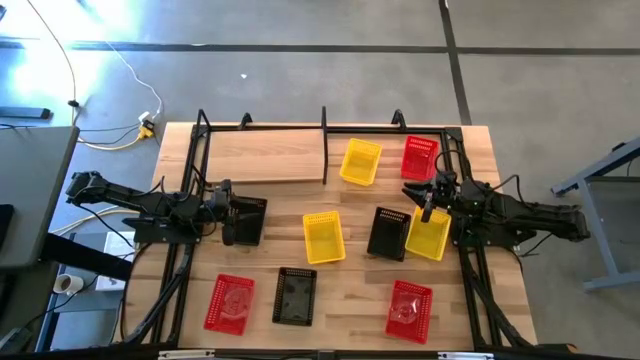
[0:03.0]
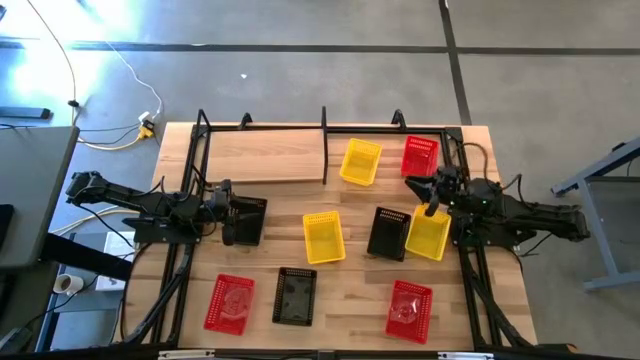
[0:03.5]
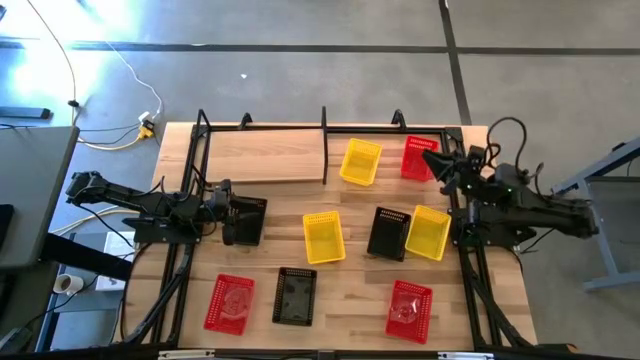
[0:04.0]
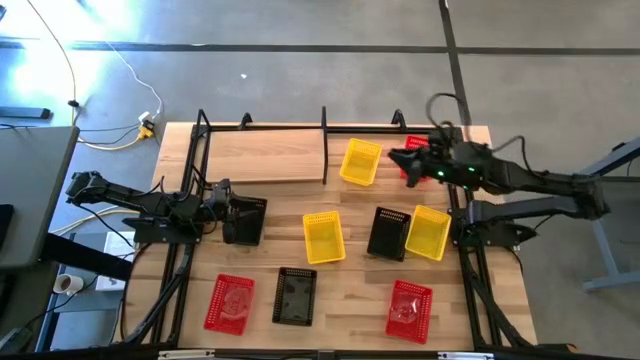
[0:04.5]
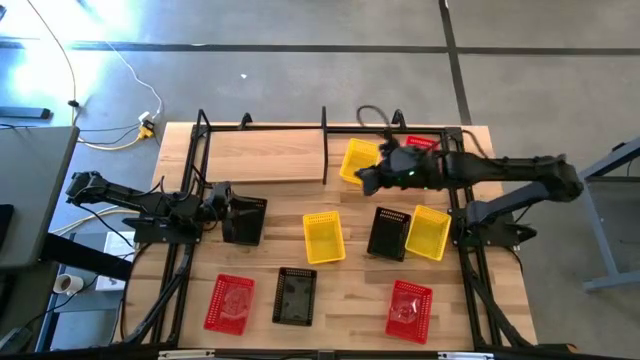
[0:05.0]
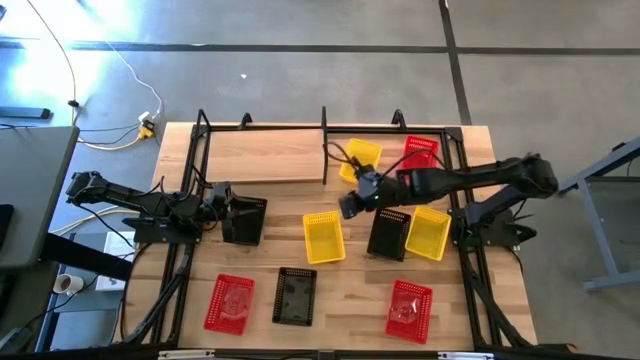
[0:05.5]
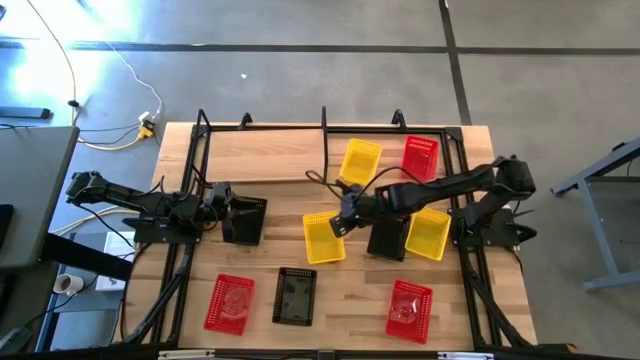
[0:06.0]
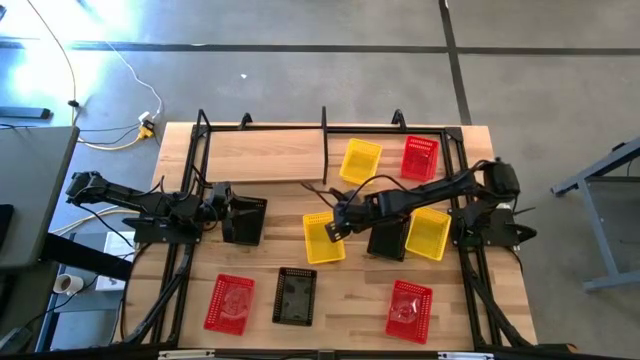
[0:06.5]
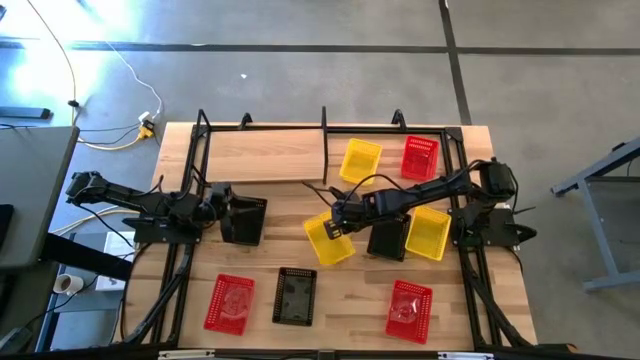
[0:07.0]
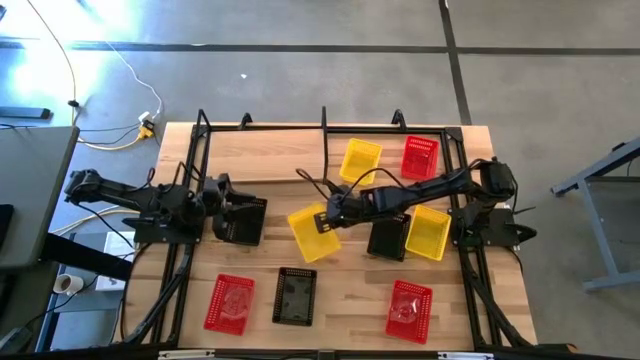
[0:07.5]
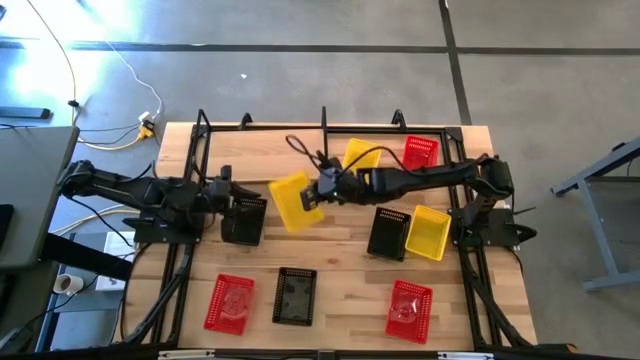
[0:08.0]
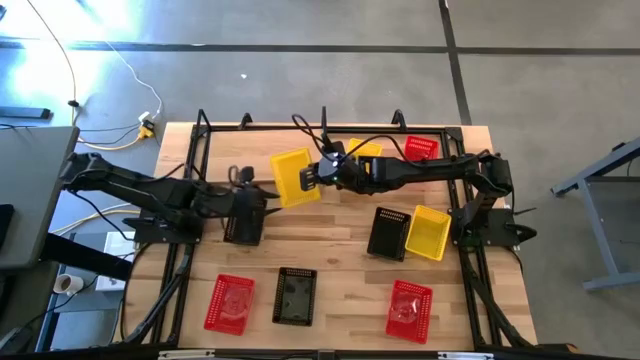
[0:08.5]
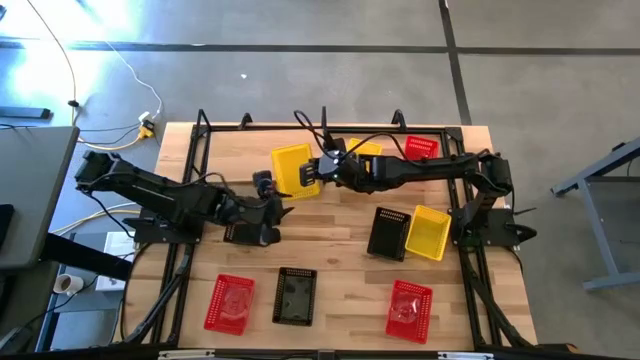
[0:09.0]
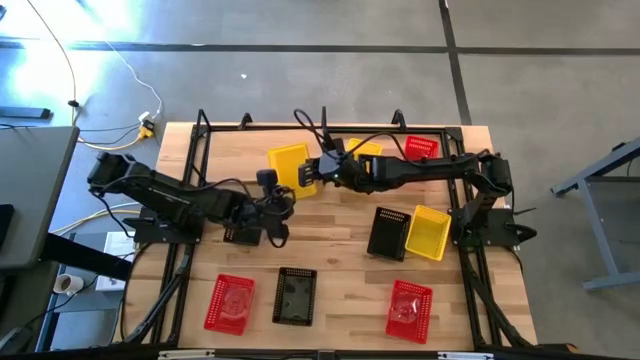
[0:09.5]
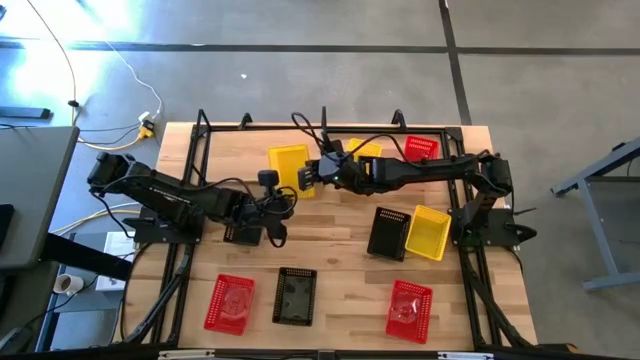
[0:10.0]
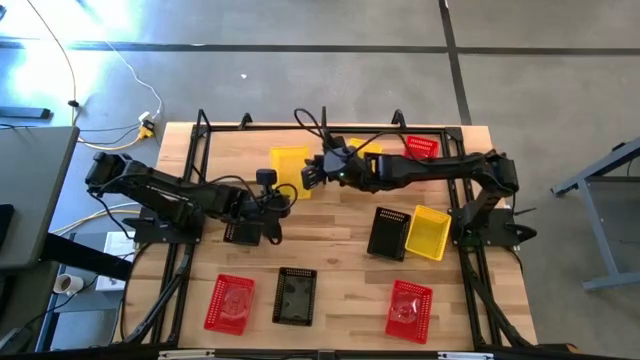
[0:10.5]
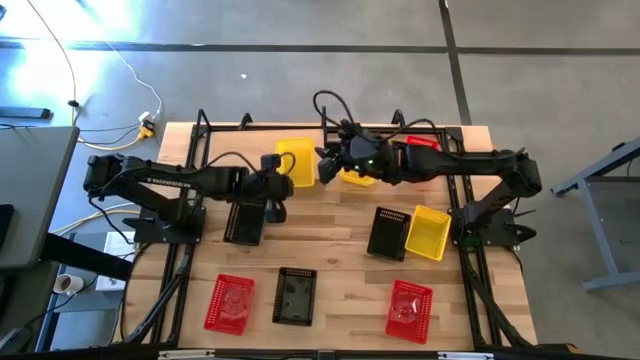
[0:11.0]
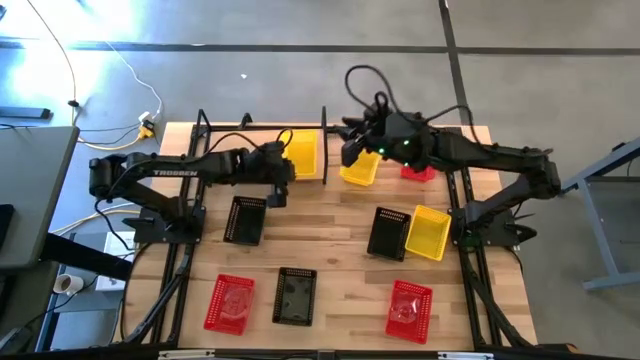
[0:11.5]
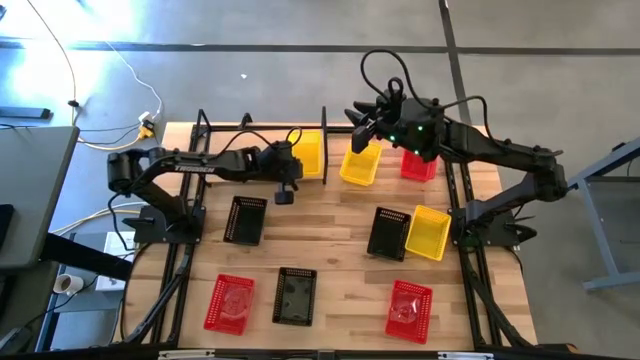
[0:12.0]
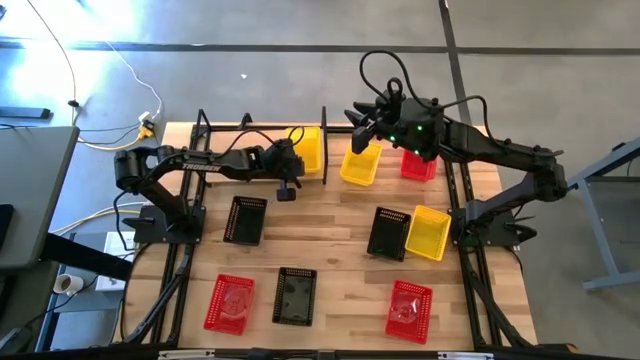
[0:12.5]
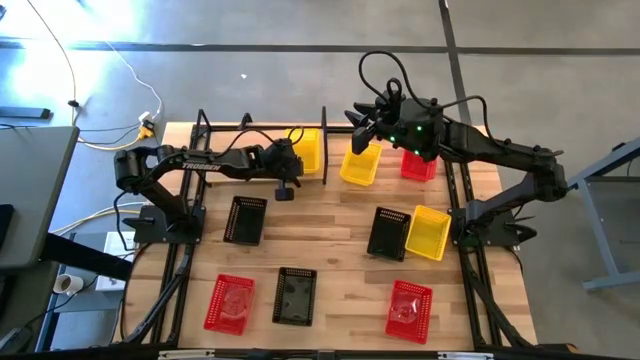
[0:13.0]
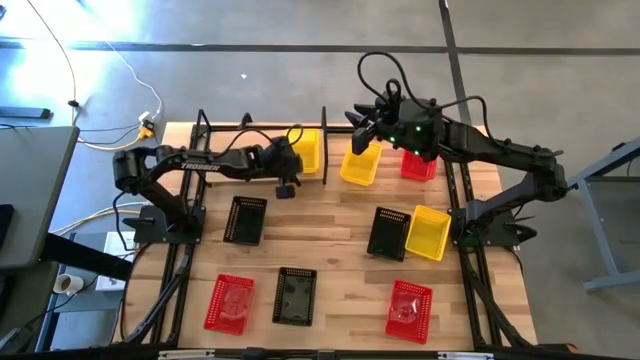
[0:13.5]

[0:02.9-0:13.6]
Task: Stack baskets on shelf by color
Put the bottom left yellow bin on the shelf

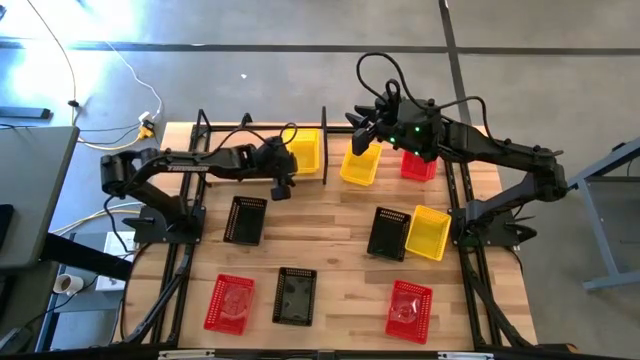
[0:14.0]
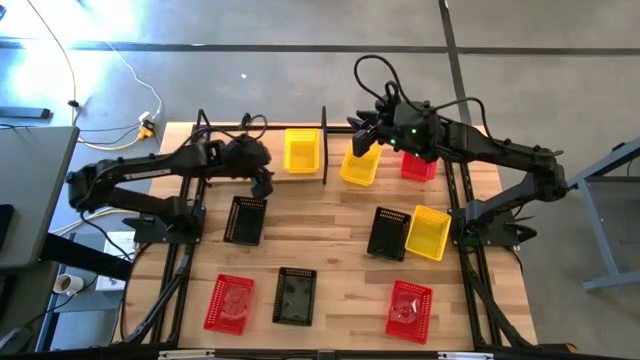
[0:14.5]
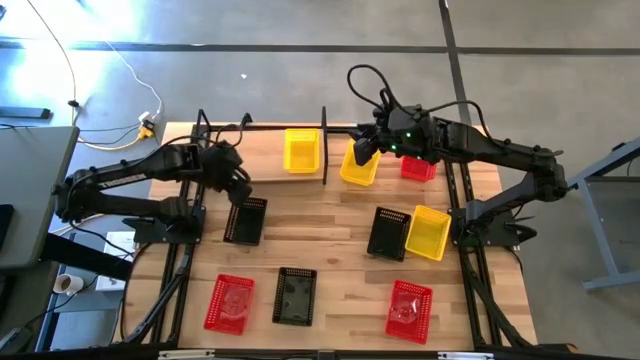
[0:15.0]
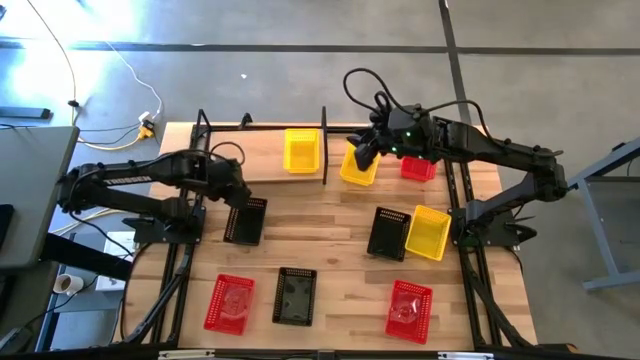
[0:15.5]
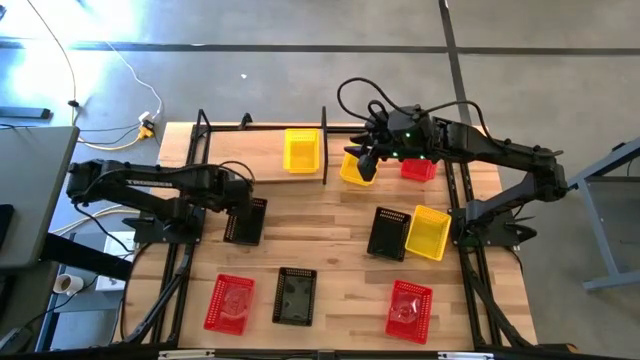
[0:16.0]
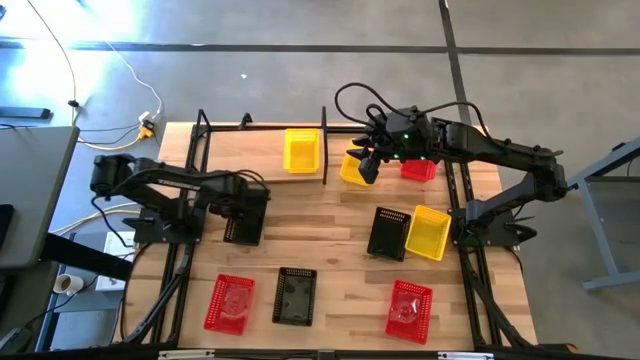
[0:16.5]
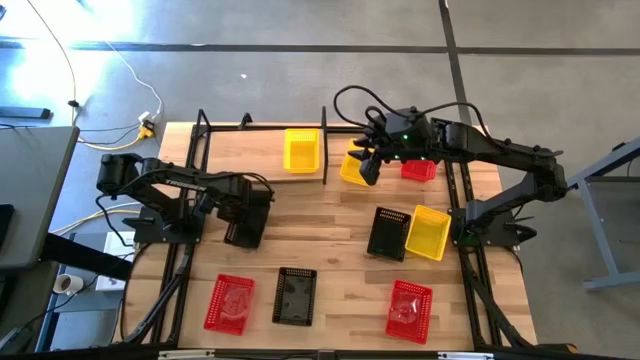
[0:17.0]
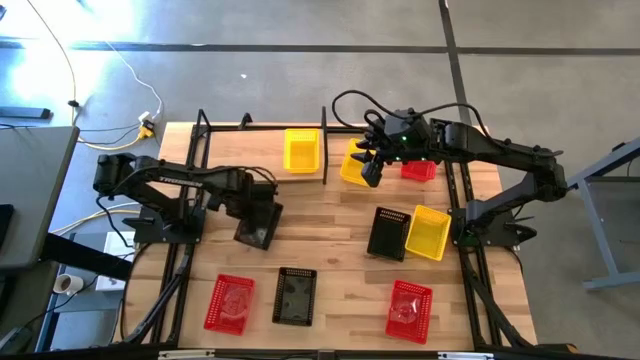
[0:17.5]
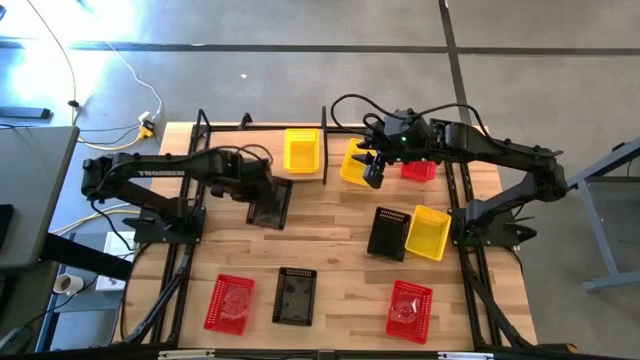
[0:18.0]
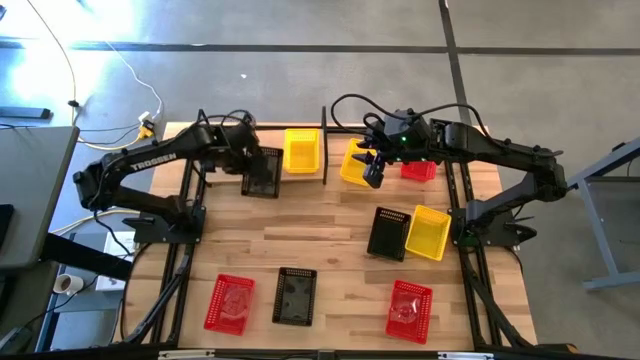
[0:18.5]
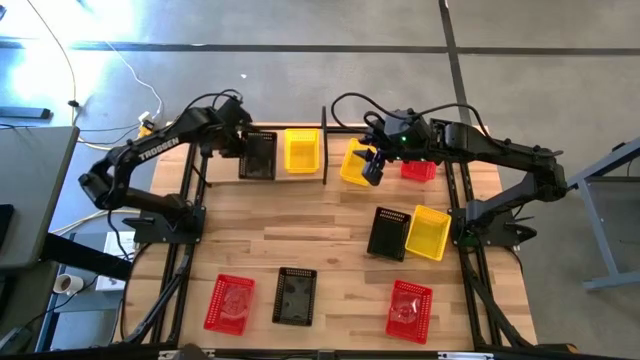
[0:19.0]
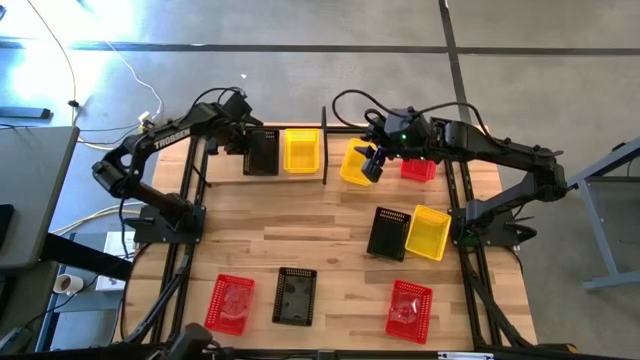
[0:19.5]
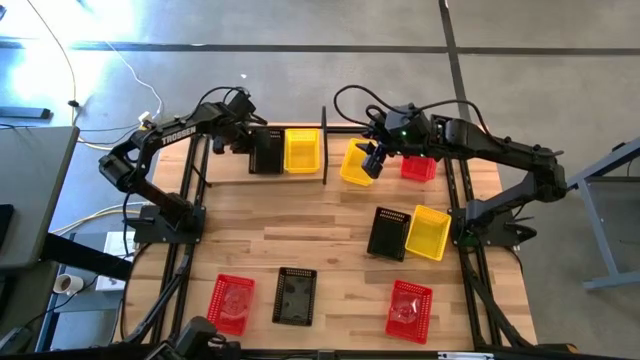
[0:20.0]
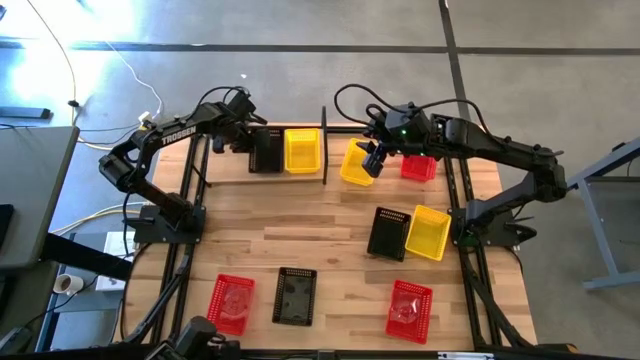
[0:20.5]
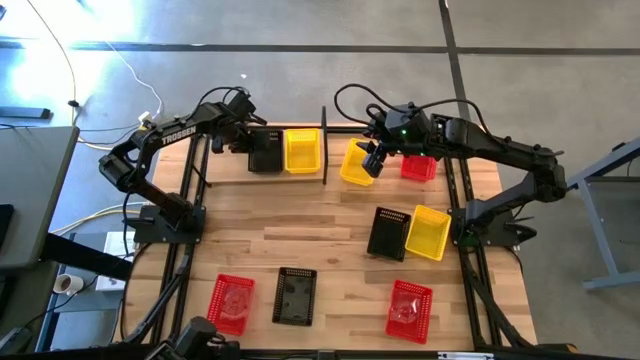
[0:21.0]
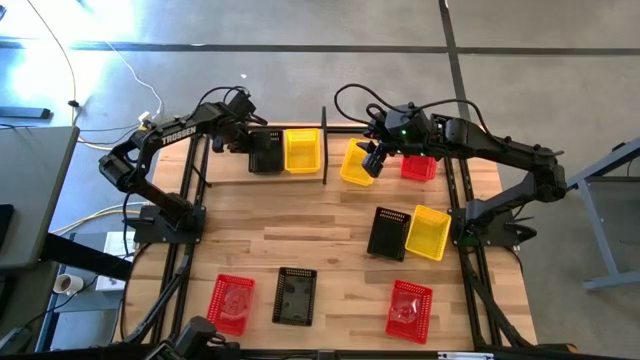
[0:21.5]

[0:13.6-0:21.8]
Put the top left black bin on the shelf

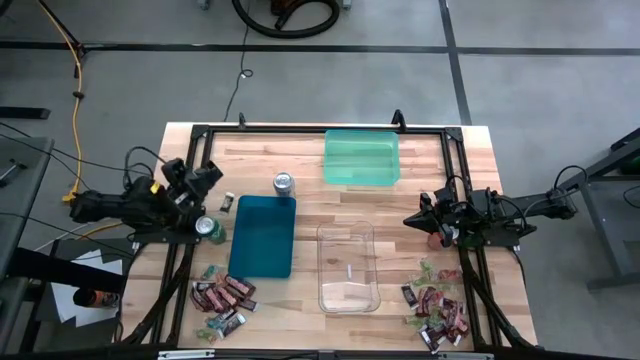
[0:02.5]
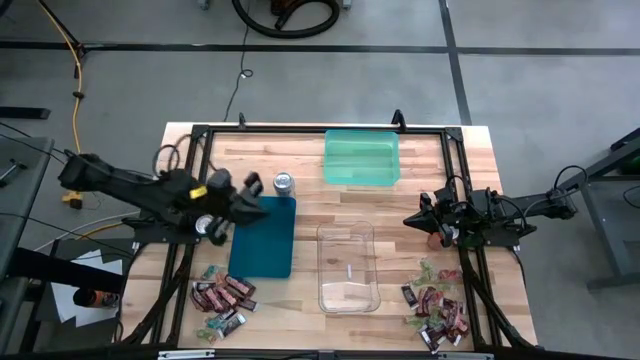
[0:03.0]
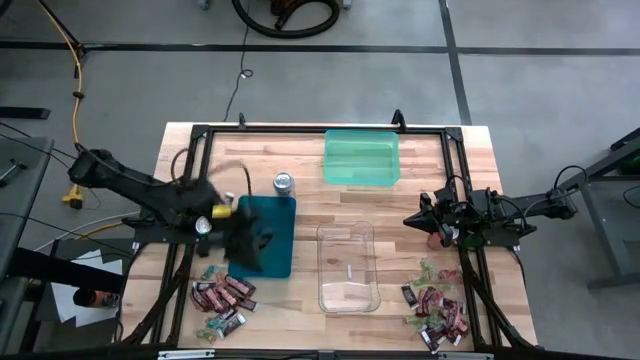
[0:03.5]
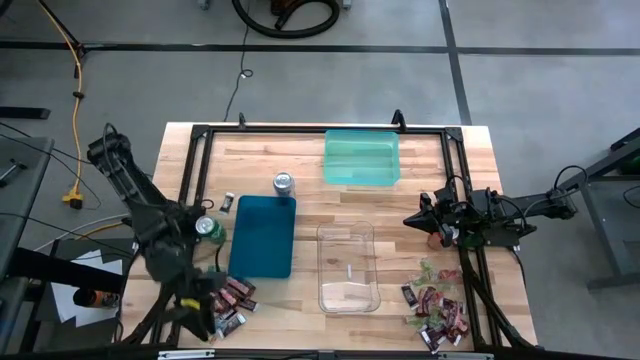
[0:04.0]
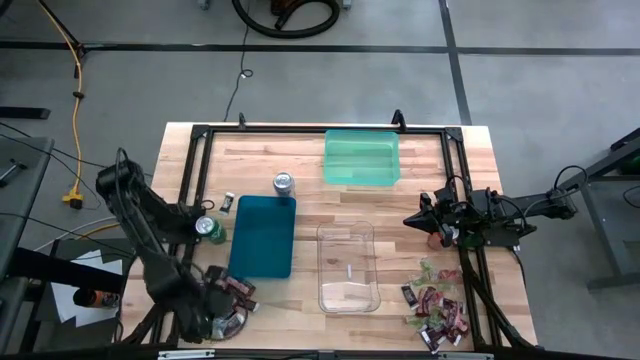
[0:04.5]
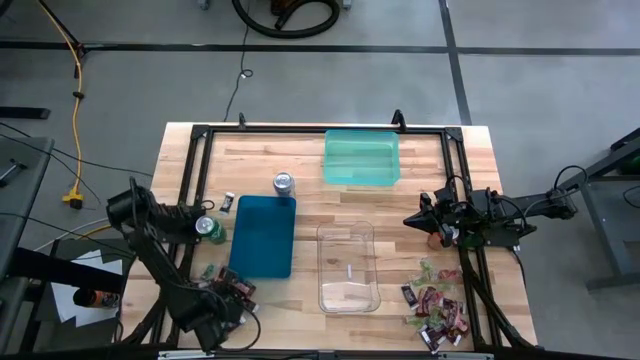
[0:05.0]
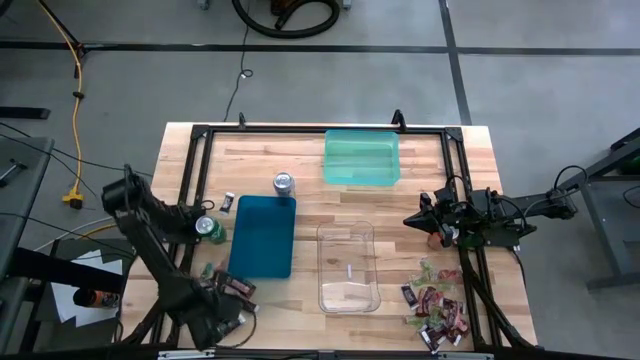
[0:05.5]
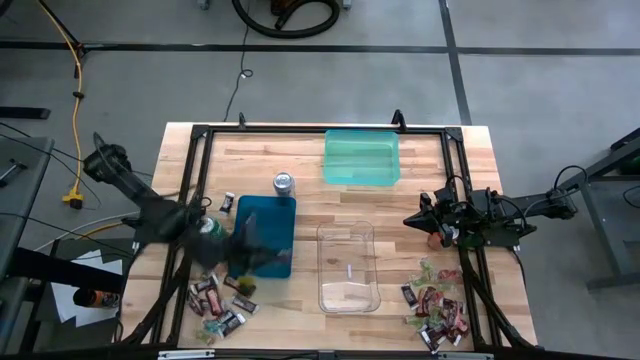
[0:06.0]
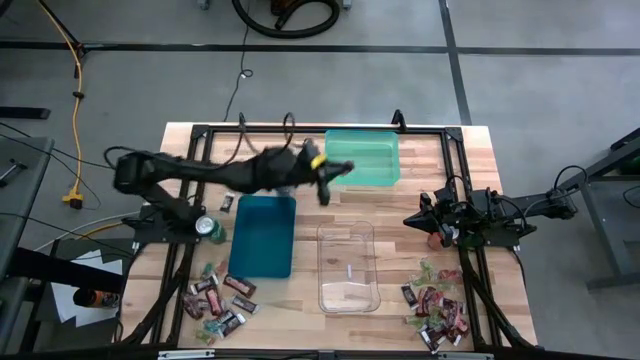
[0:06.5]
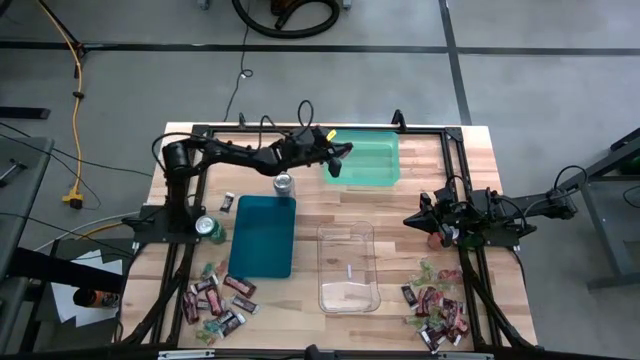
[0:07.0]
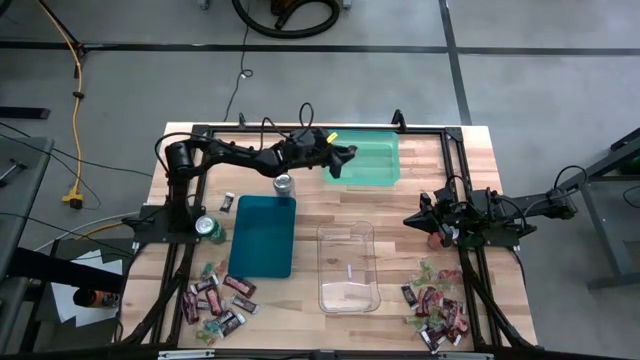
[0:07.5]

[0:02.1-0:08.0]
Task: Sort candy
Put the chocolate peanut bar into the green bin
